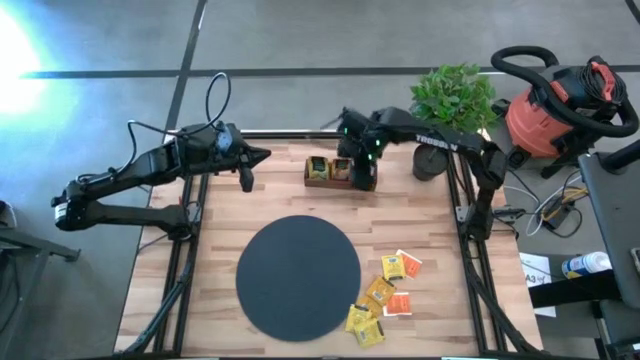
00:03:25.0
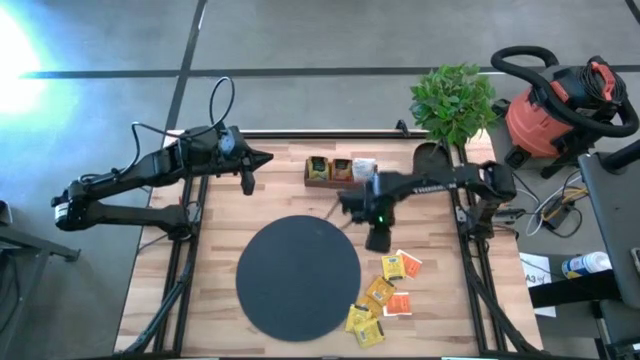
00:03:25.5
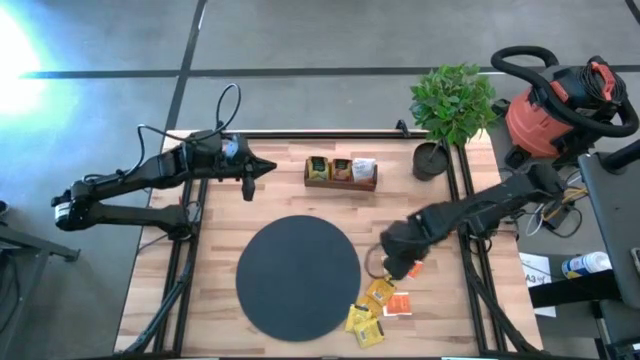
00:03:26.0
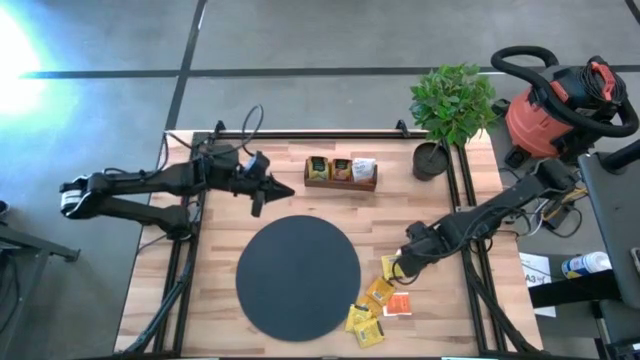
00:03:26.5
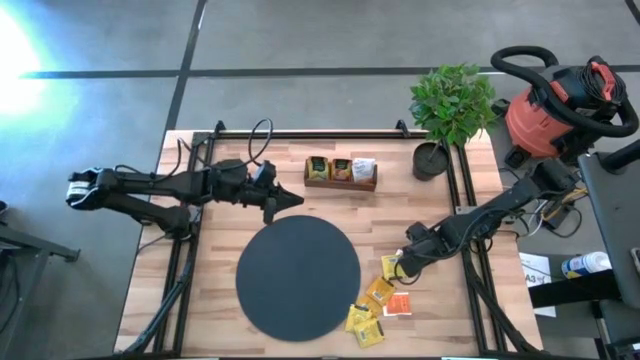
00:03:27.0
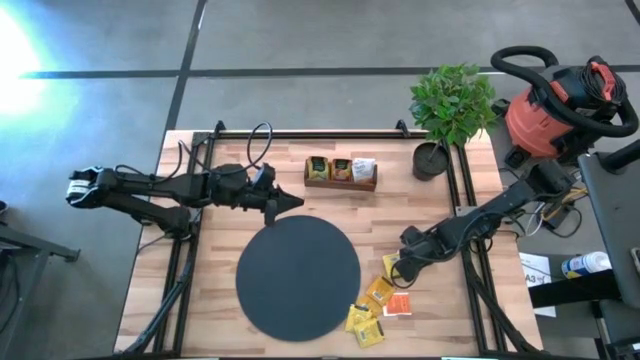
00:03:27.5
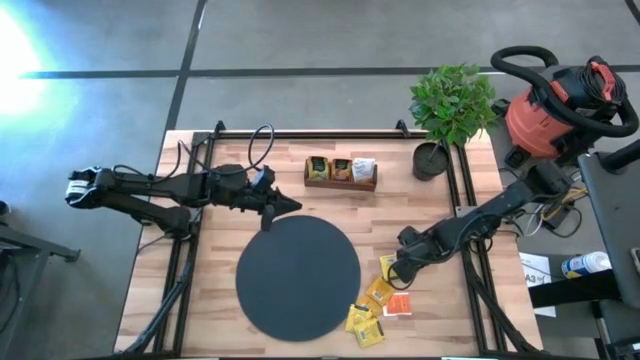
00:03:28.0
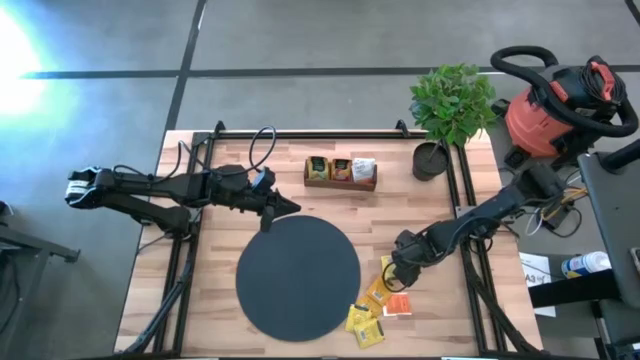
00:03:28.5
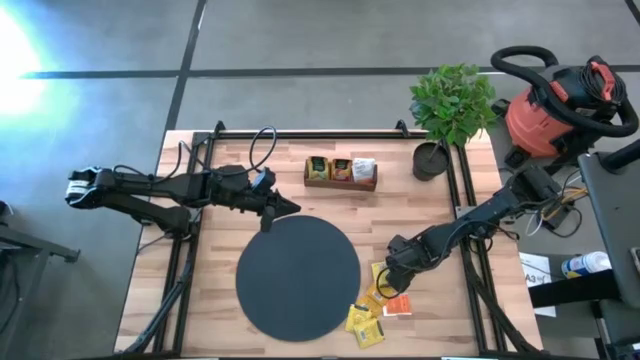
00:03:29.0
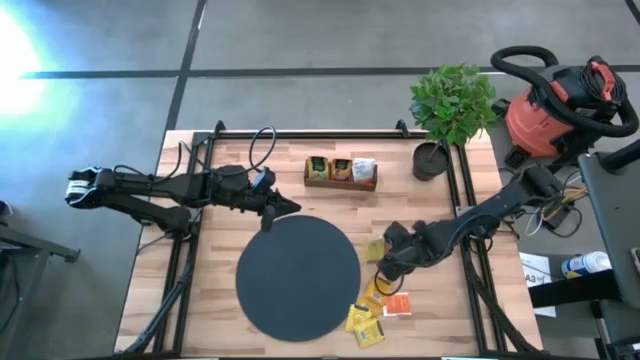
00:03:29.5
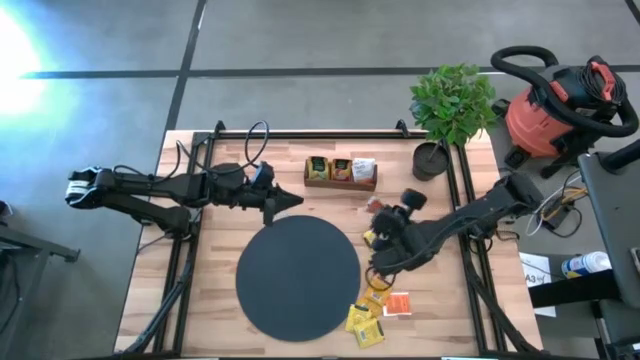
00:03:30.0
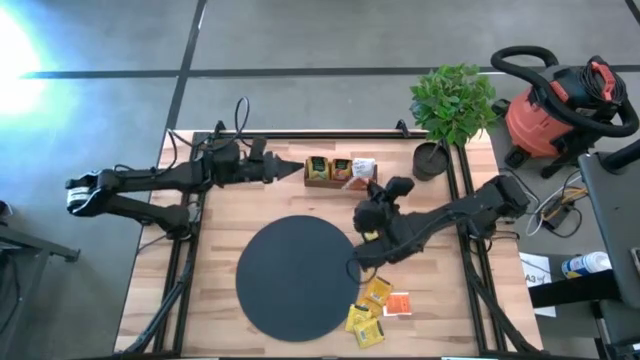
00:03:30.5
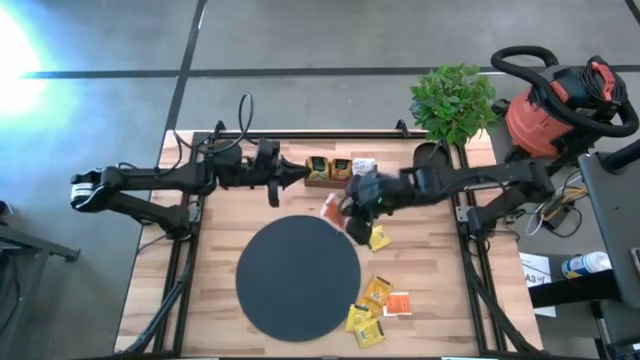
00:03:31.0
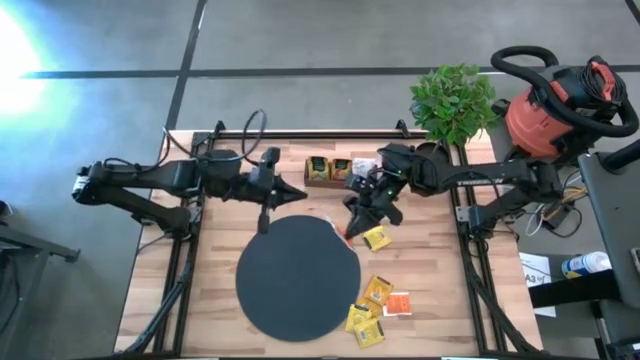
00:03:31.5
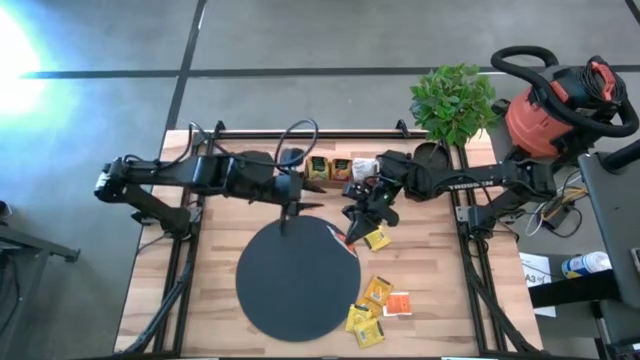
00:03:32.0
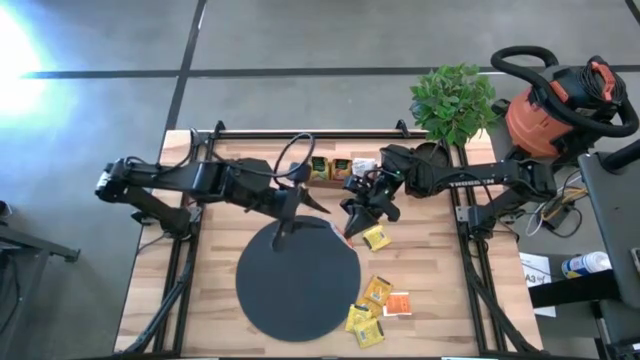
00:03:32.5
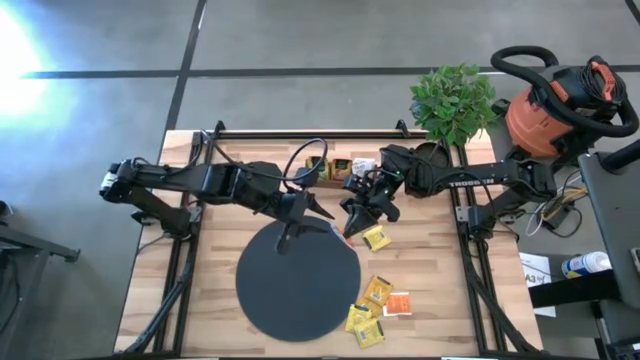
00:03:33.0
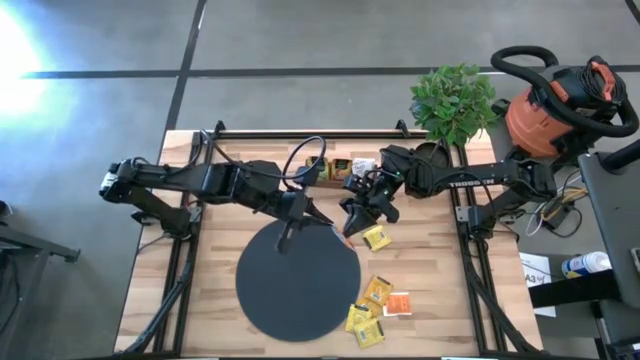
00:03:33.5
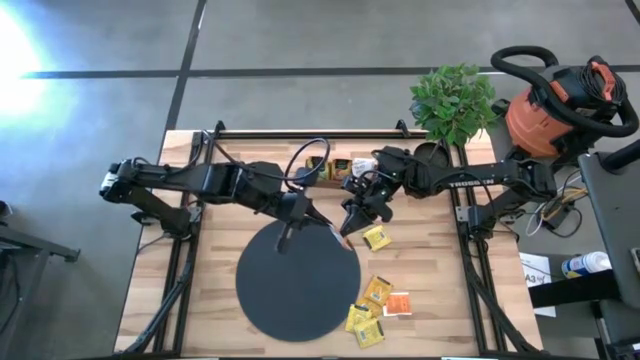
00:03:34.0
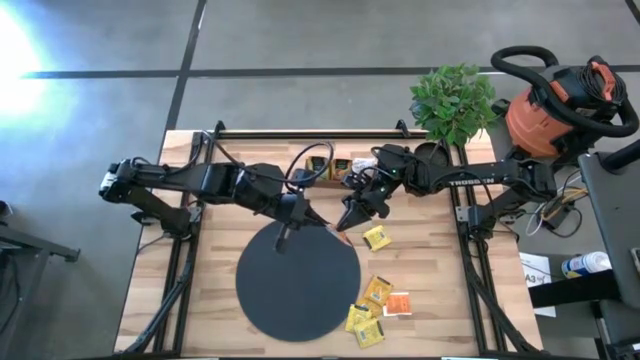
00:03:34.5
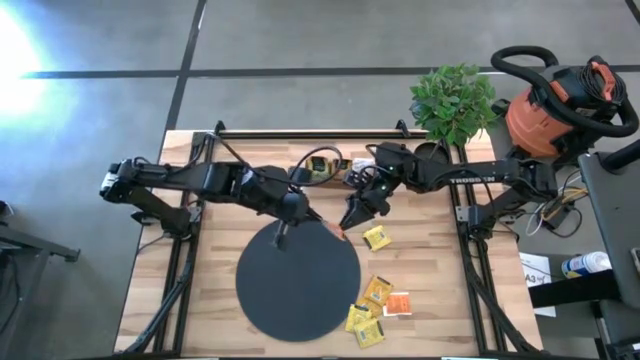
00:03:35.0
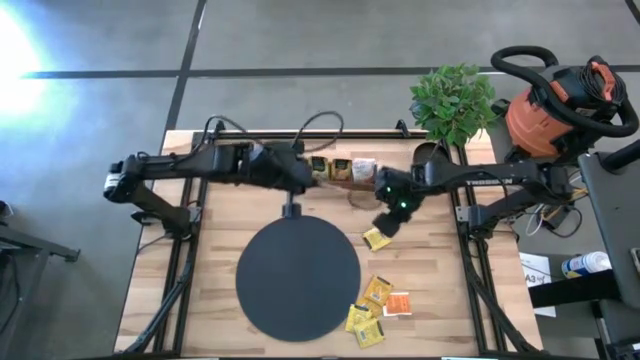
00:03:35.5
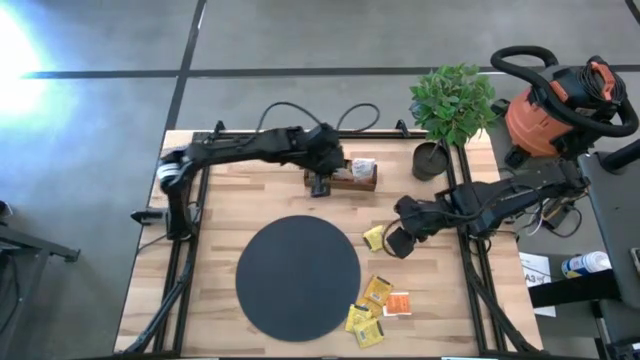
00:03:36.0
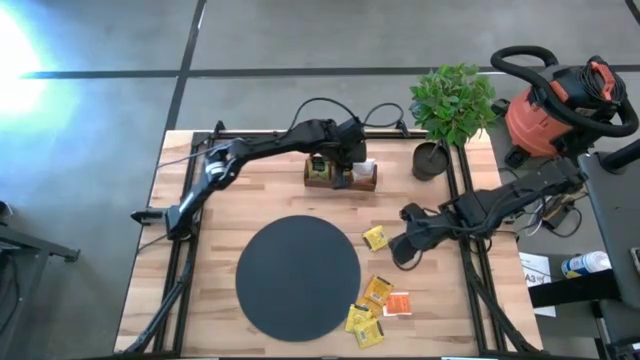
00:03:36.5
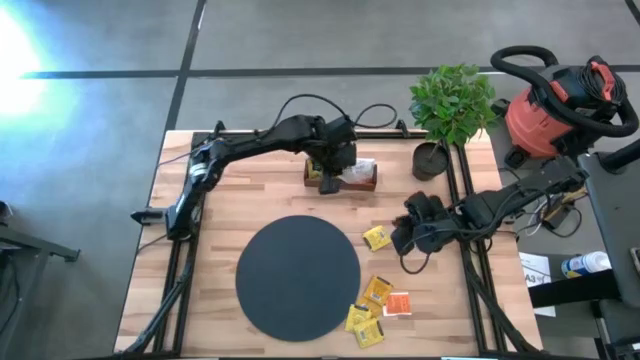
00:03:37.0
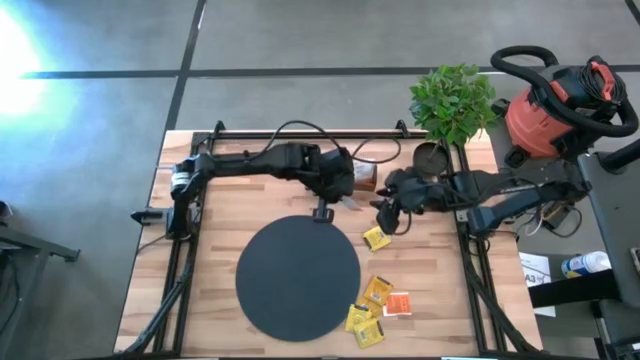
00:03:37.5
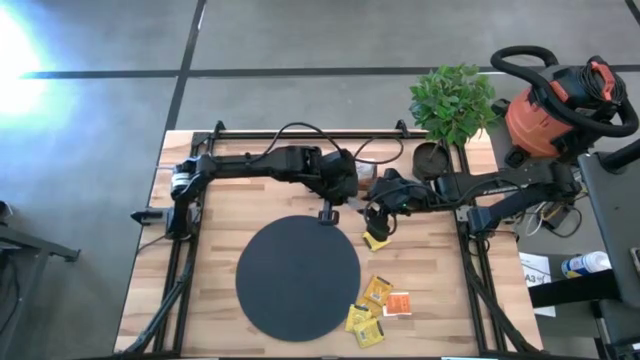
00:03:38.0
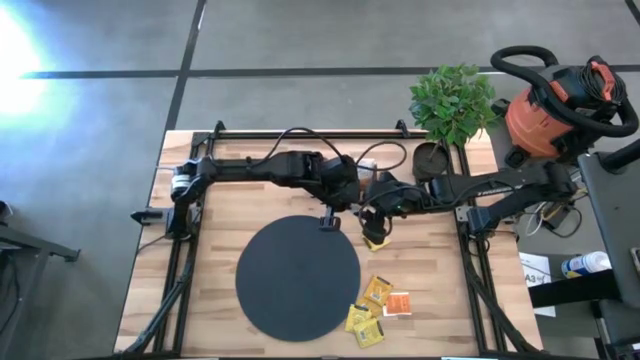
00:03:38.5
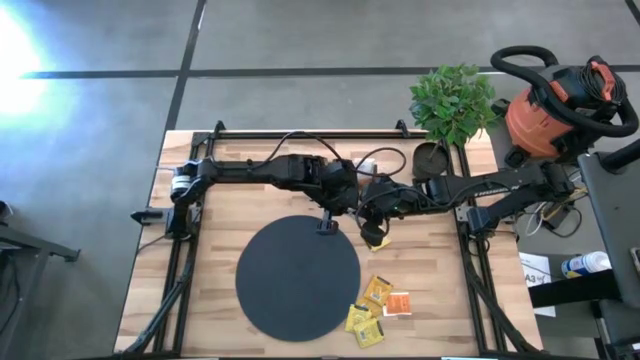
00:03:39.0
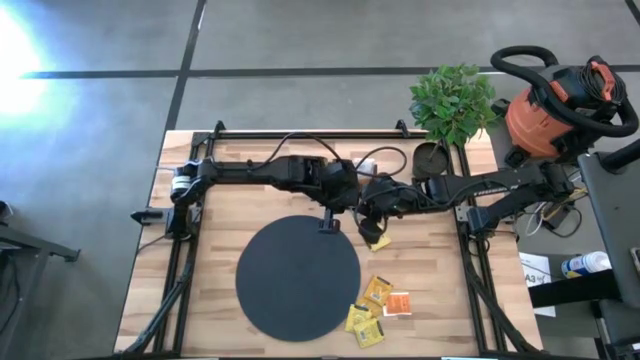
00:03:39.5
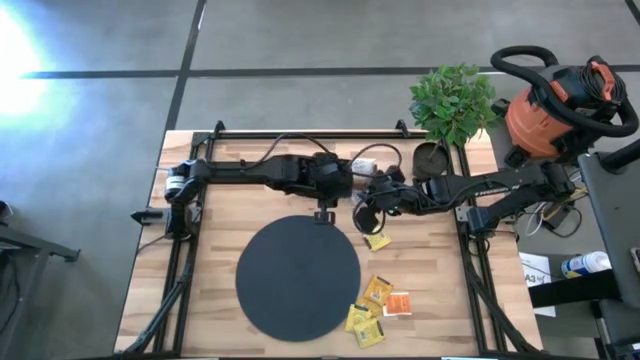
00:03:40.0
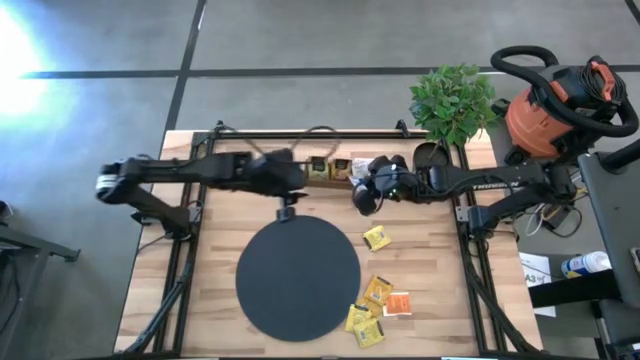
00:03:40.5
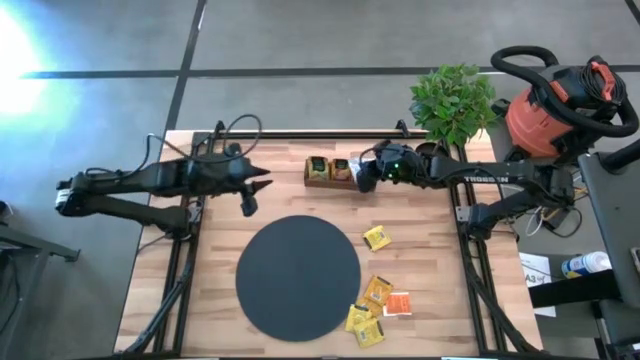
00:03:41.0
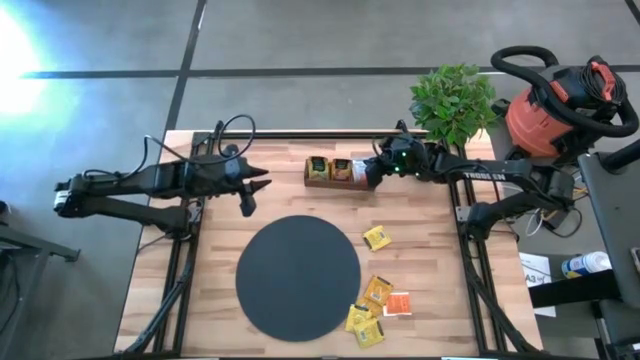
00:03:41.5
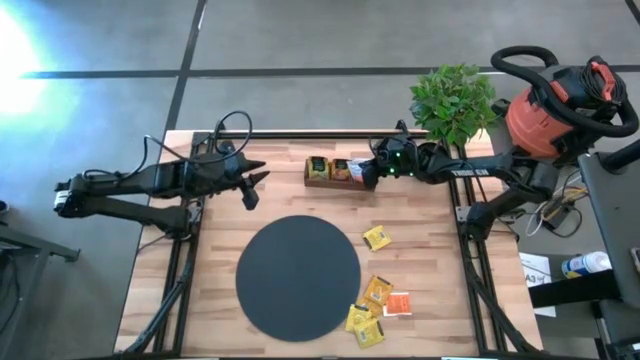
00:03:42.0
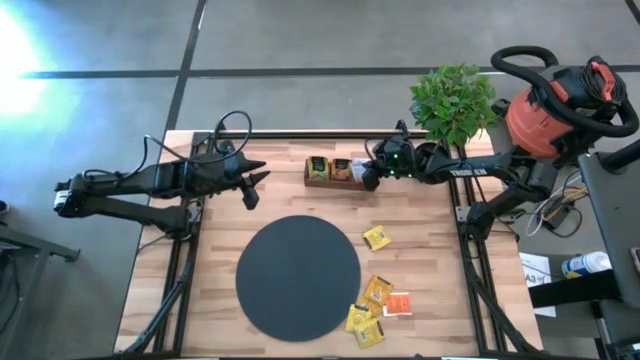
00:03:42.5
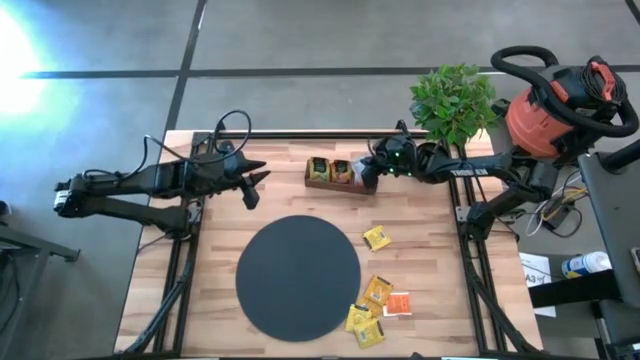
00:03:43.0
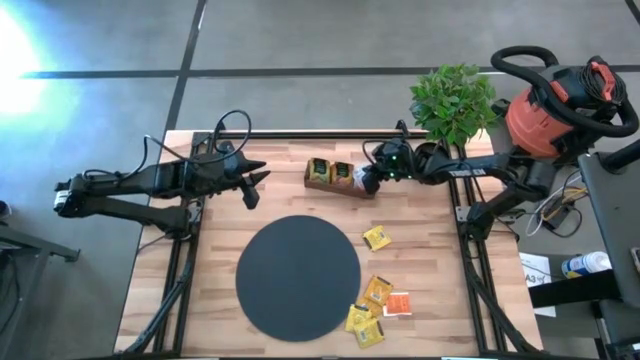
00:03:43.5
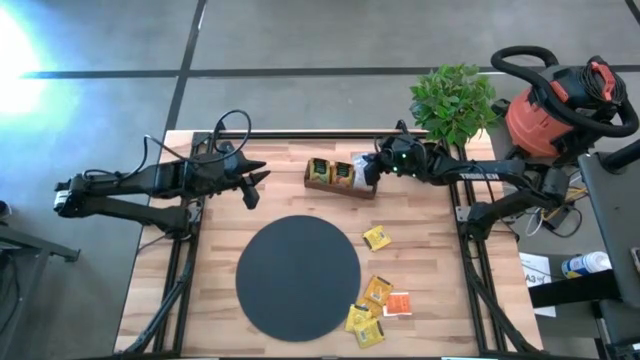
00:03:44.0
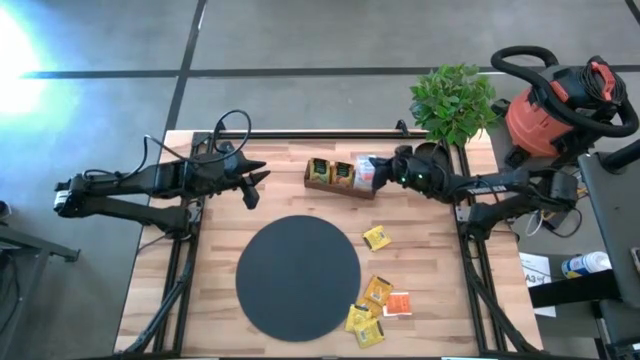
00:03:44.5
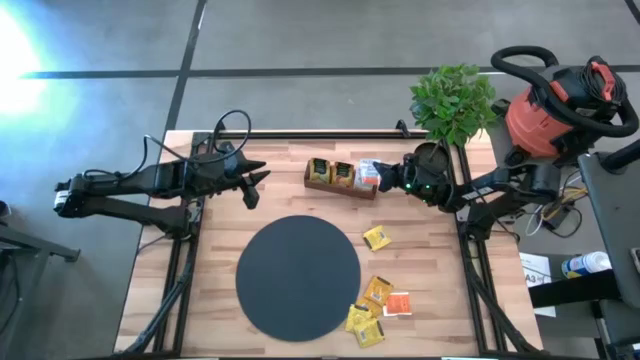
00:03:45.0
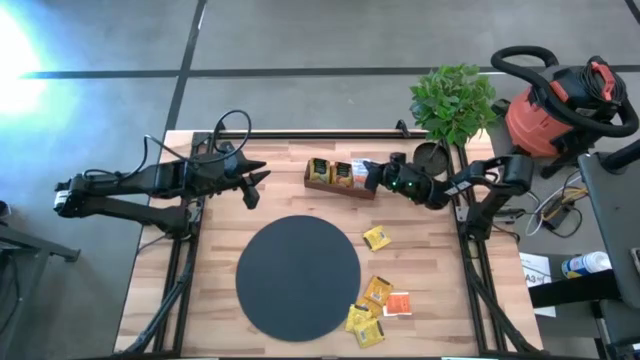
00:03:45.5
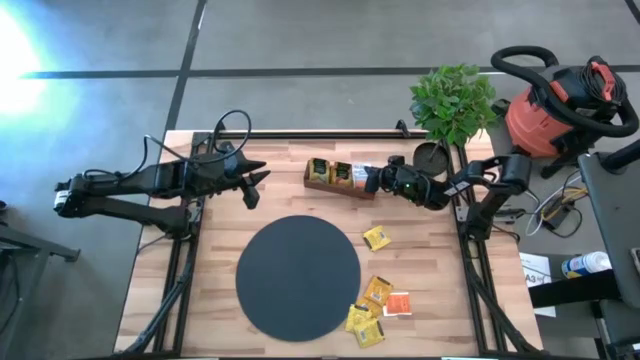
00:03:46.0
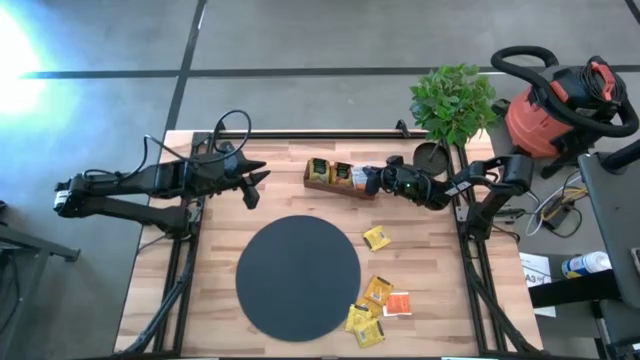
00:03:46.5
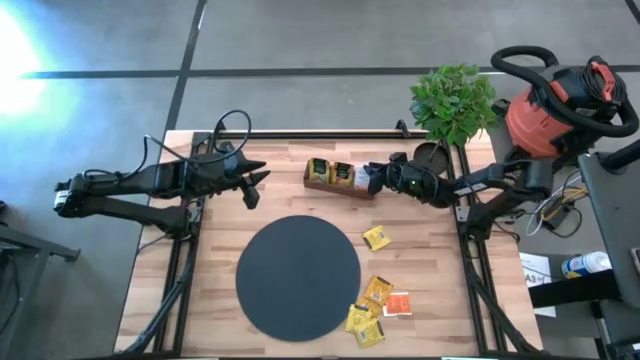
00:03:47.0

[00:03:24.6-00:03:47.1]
Task: Pick & Place Tea
Put the top white tea bag into the right section of the wooden organizer
